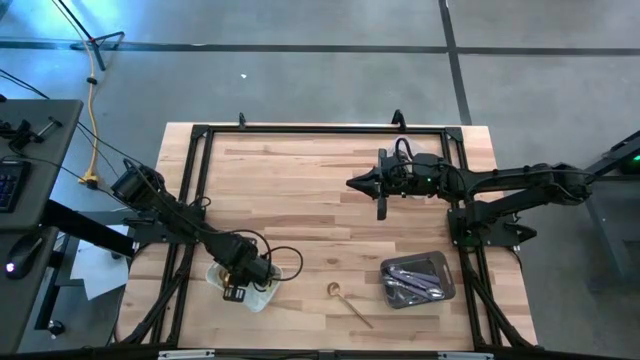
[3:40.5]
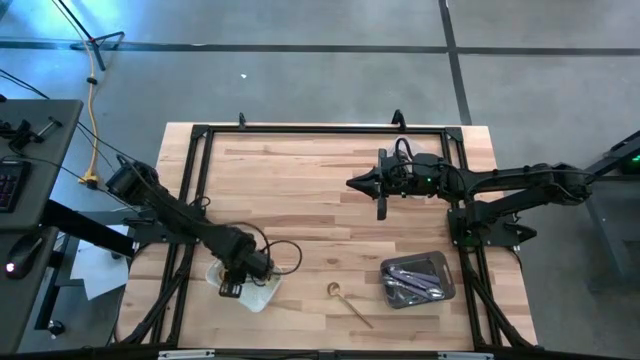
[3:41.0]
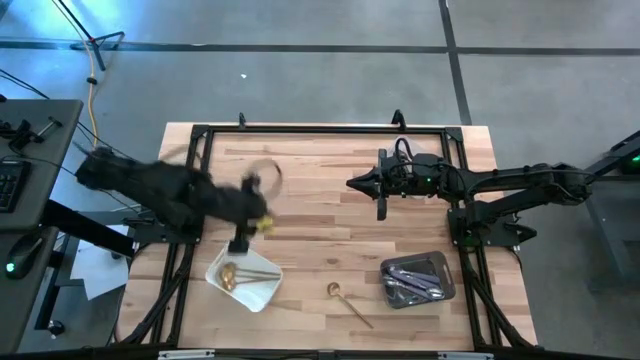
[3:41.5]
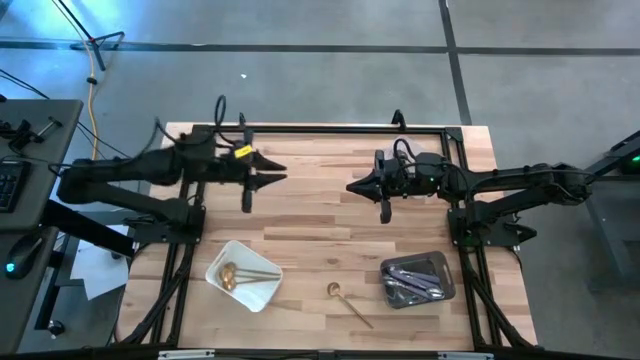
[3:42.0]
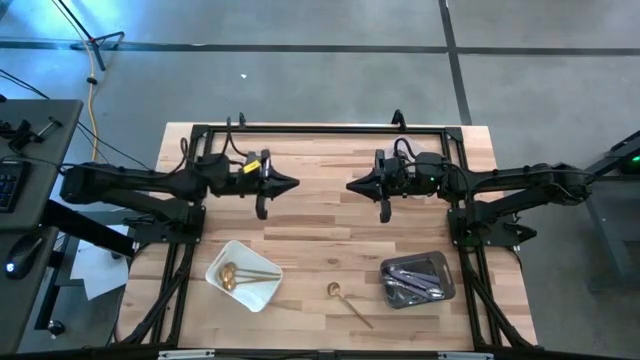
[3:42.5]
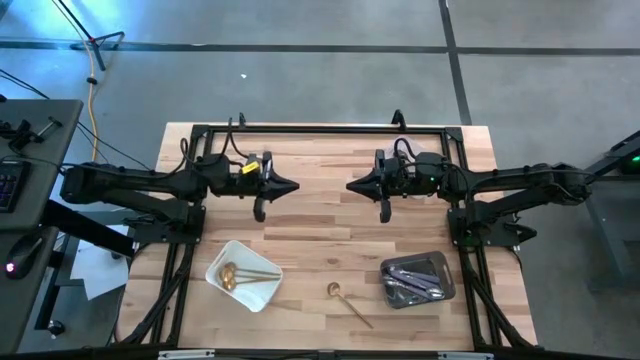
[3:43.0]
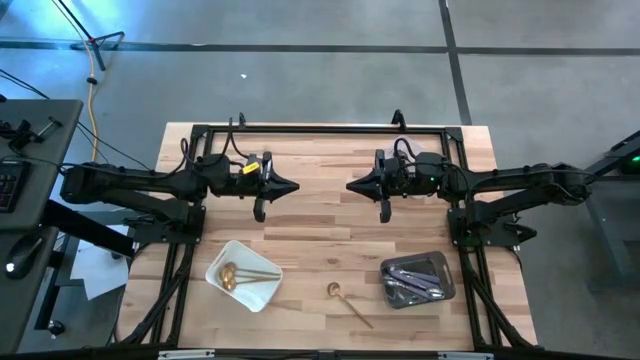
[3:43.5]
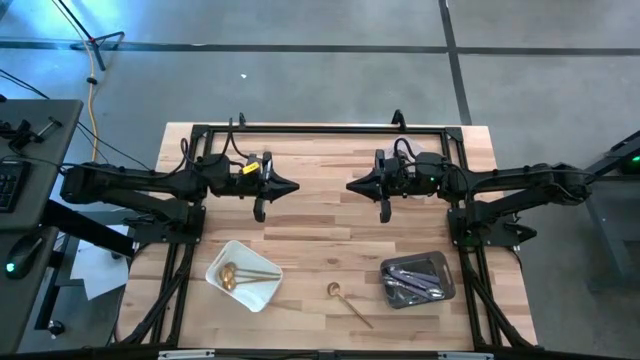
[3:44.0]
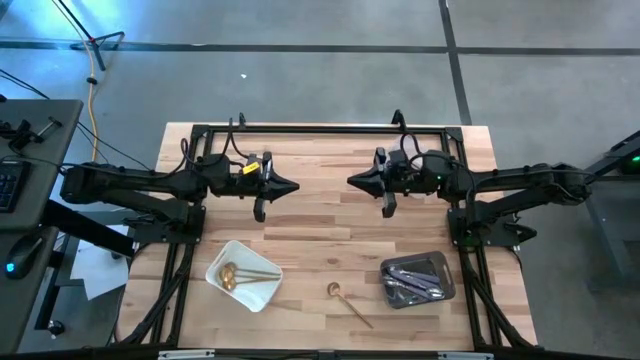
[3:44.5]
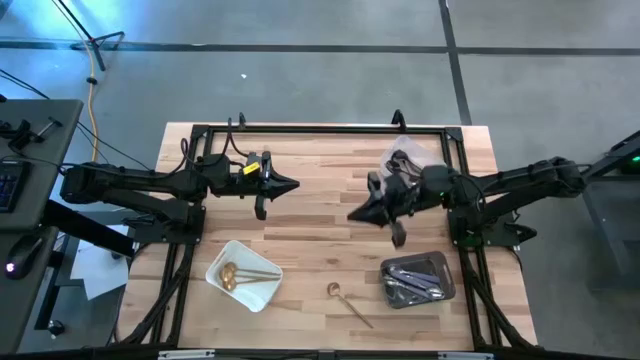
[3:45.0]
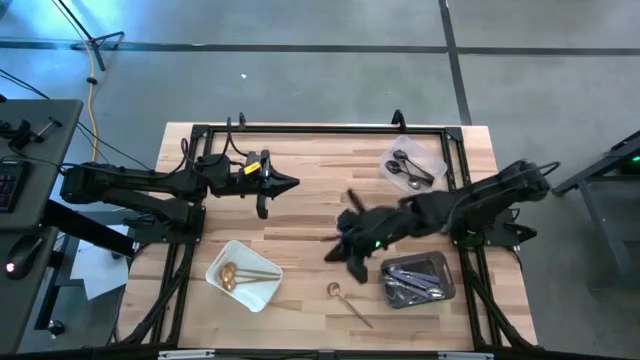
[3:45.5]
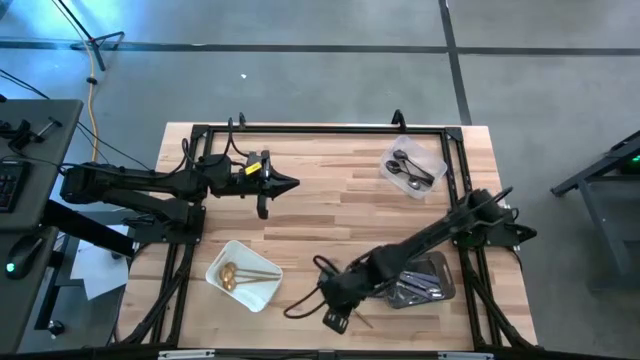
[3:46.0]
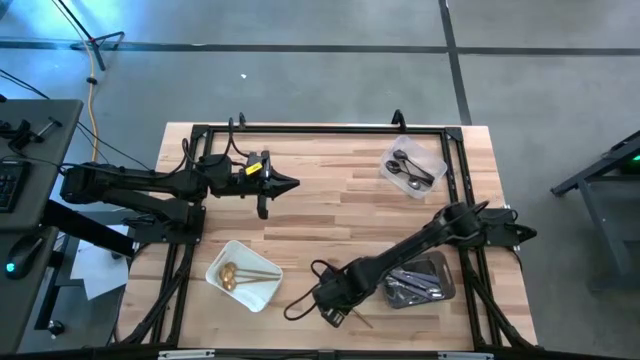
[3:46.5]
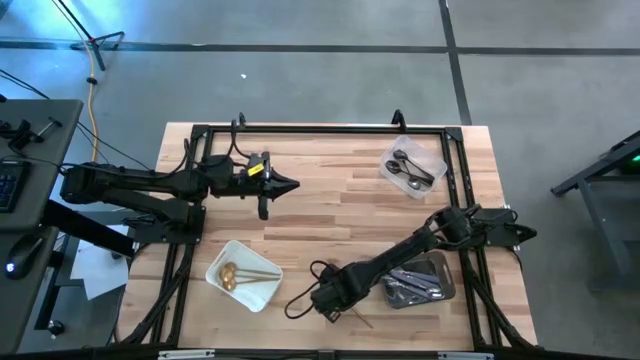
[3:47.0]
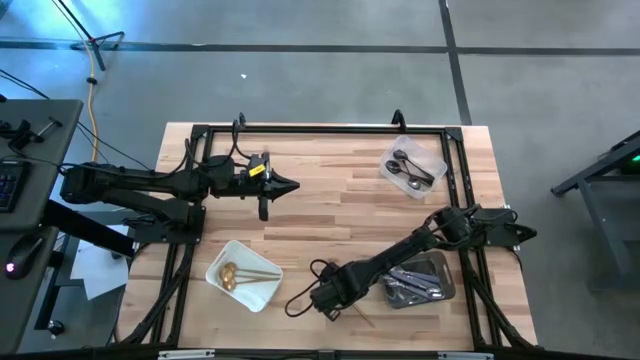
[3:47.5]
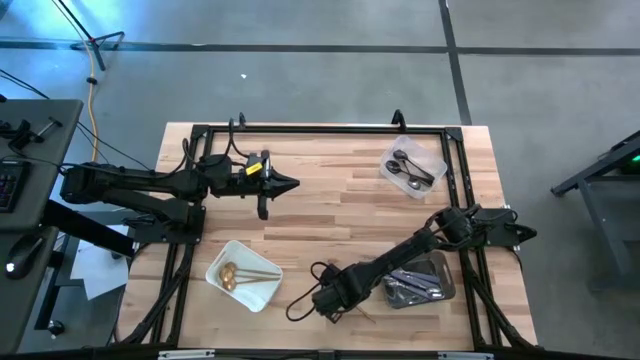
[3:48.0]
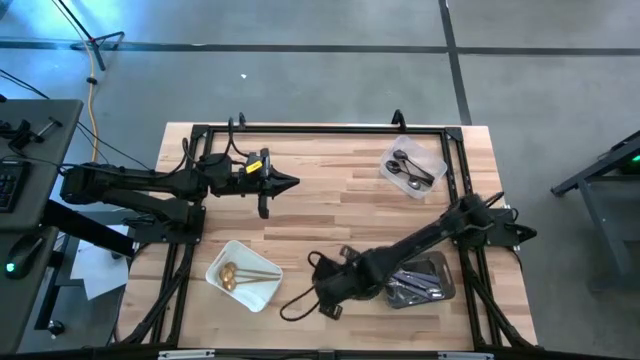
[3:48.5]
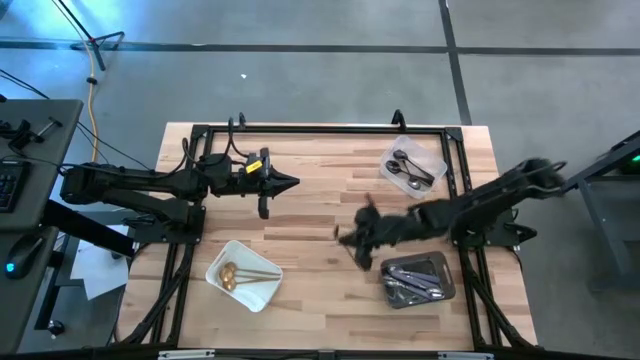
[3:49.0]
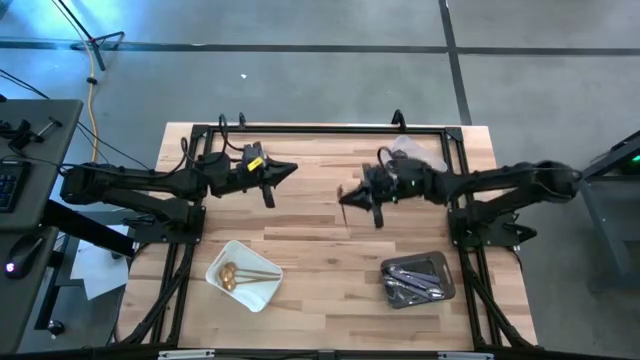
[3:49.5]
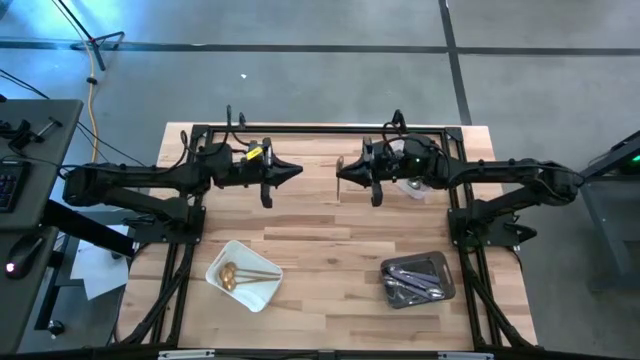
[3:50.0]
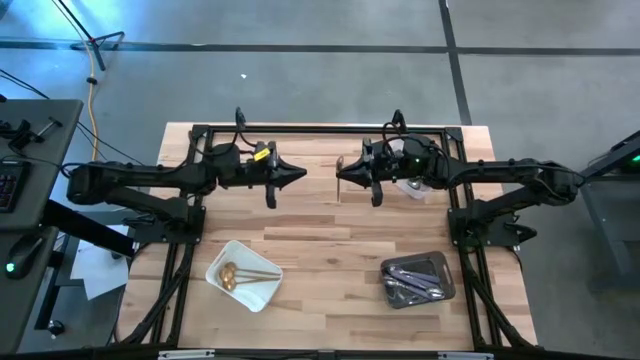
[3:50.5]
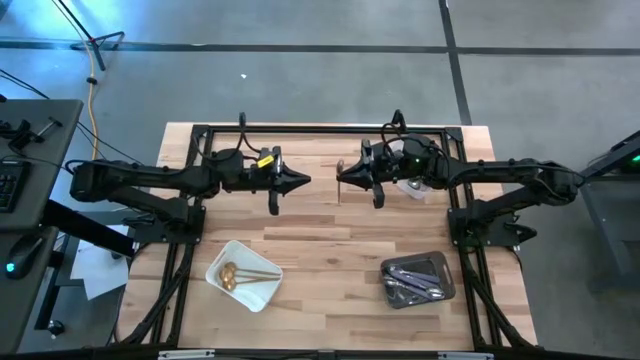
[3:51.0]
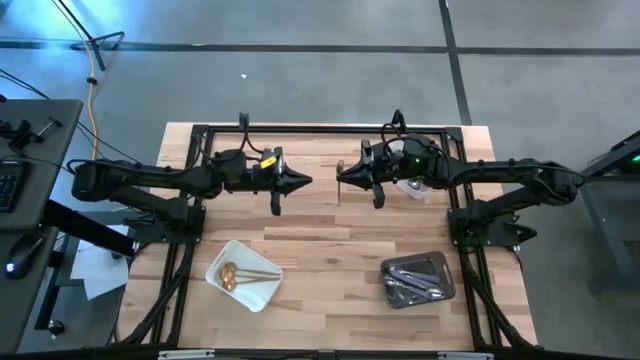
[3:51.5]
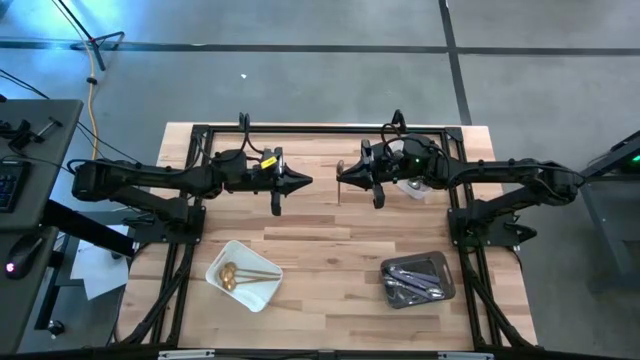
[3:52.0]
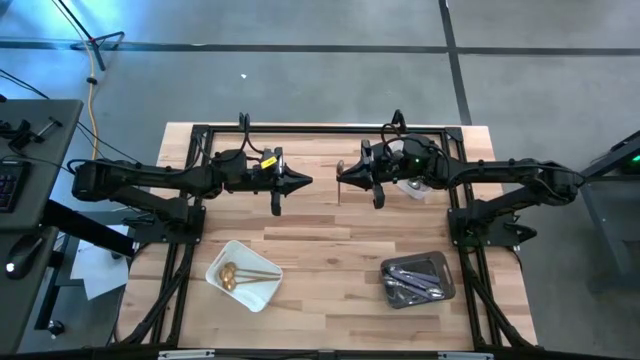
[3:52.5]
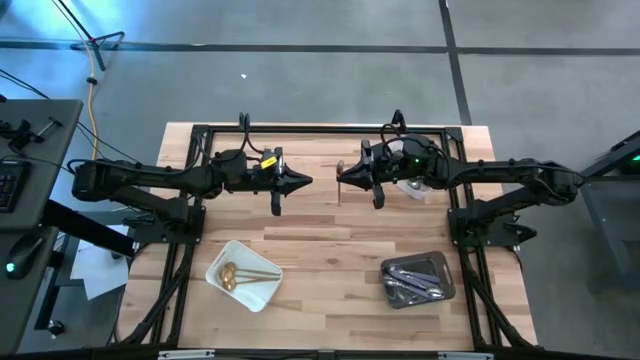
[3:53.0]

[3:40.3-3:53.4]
Task: Sort silverware by color (type)
Put the gold spoon into the white bin

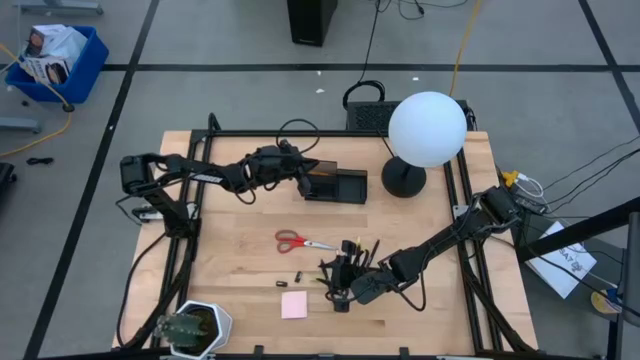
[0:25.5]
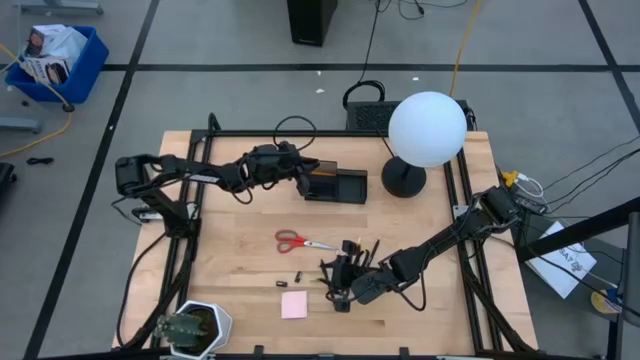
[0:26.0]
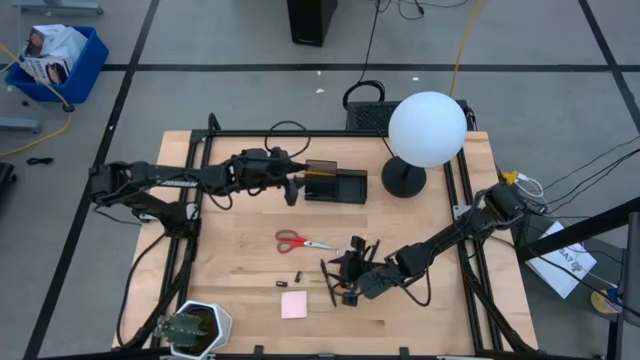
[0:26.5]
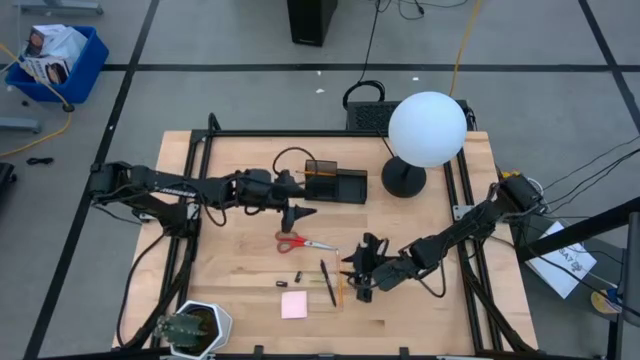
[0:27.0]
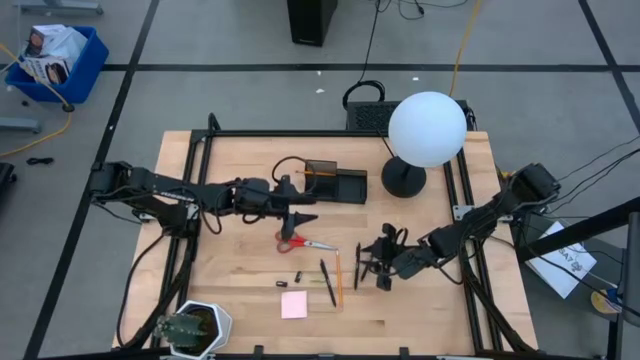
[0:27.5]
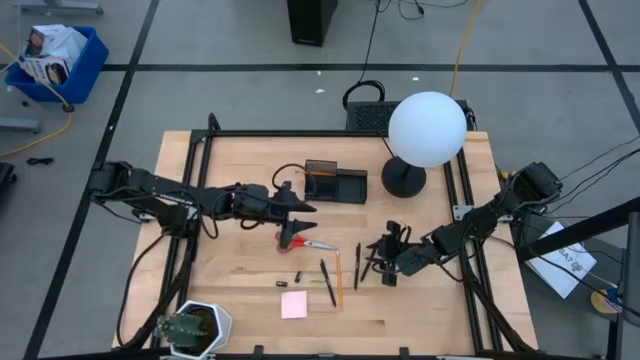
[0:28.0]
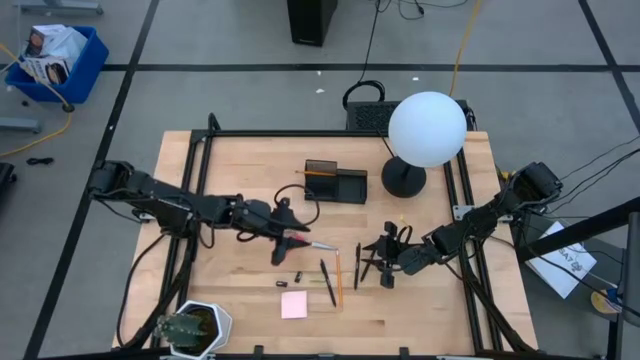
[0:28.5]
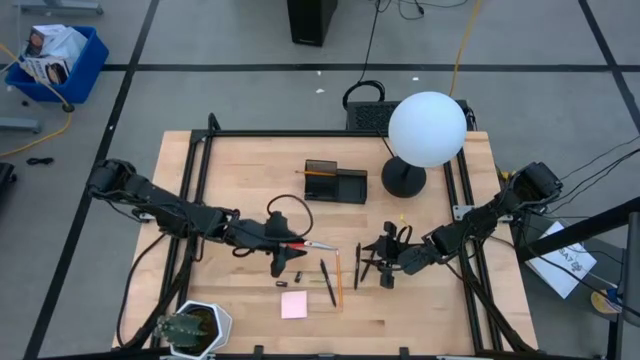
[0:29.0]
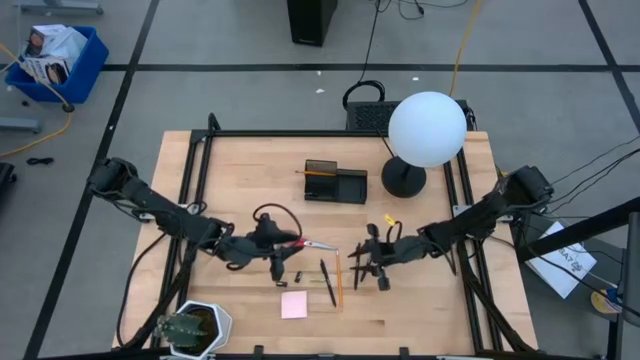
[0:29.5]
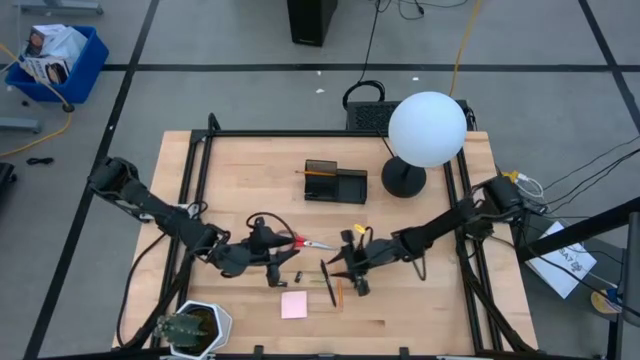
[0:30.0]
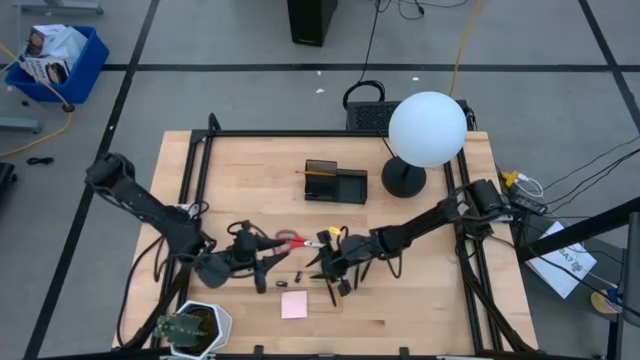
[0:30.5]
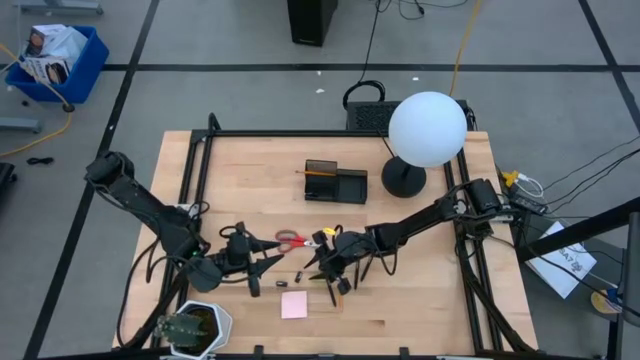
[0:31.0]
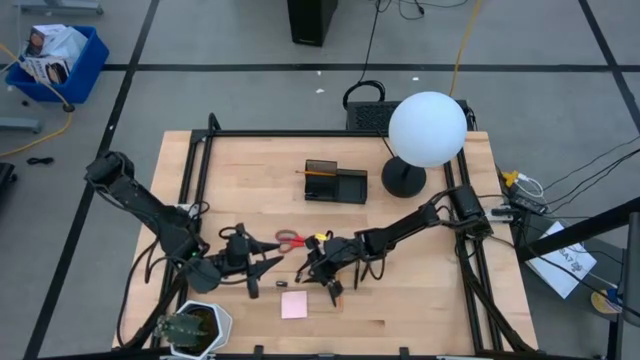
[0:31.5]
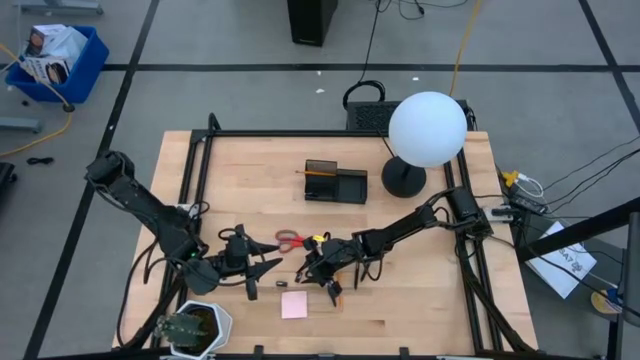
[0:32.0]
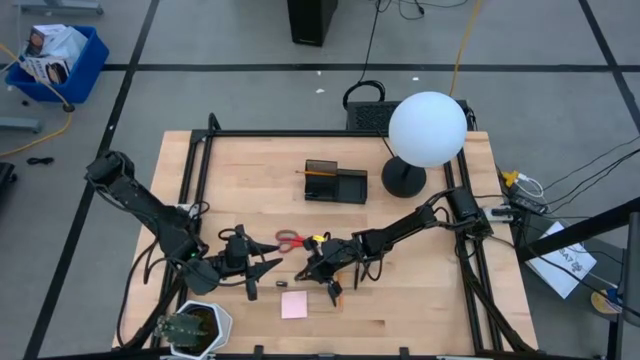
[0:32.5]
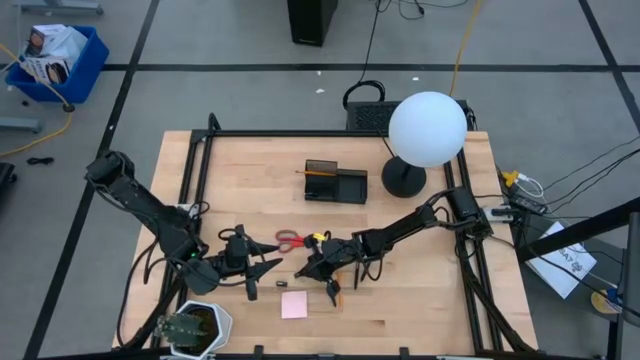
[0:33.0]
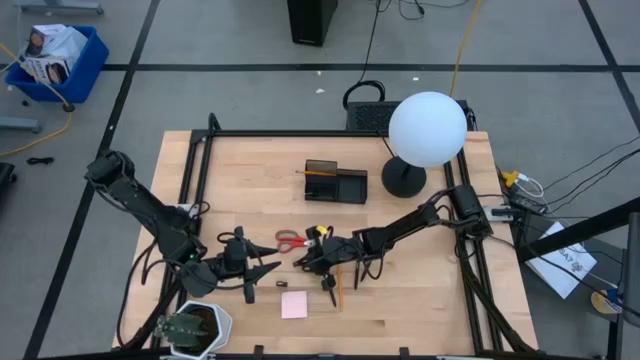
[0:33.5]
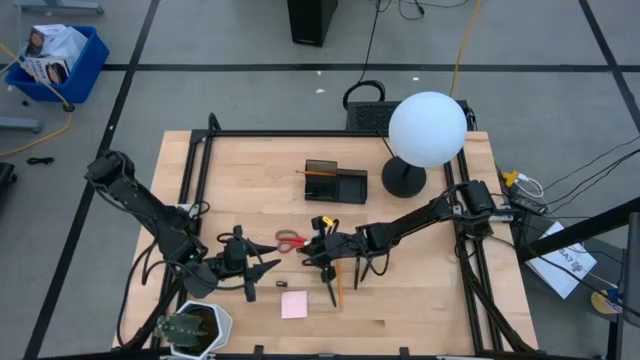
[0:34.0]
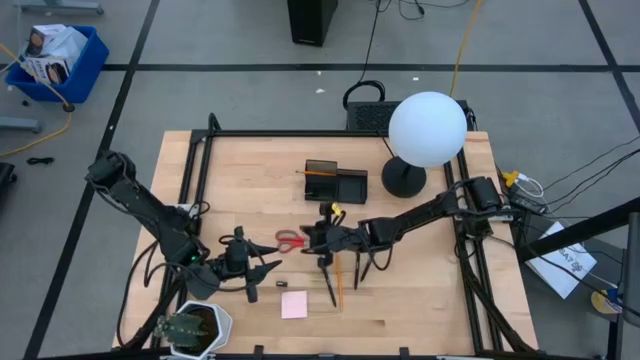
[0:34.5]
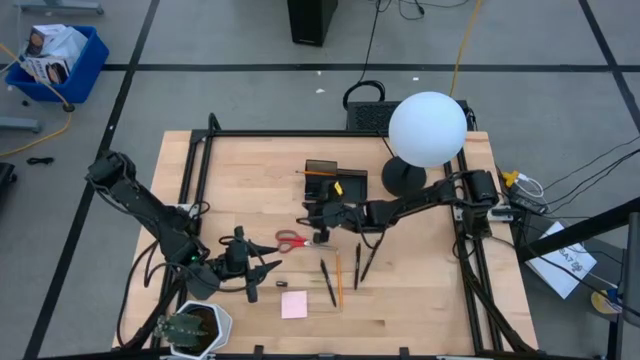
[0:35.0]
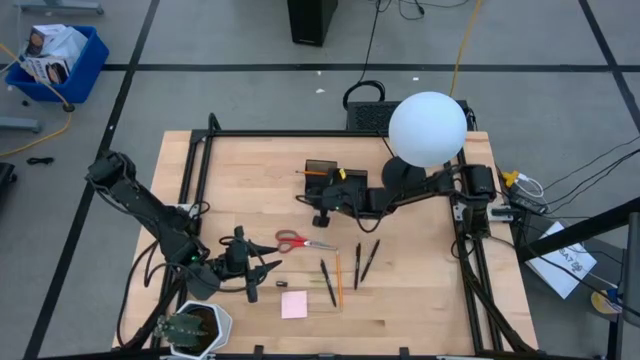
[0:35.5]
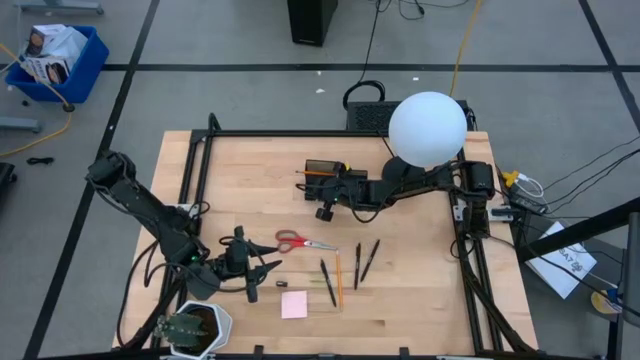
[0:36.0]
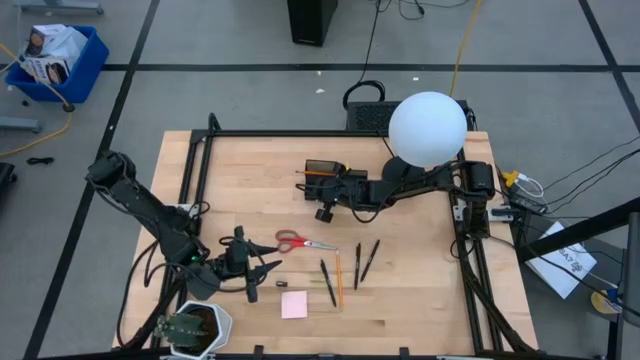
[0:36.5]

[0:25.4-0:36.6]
Task: Pick and place office supplies into organizer
Put the right black binder clip into the black desk organizer
